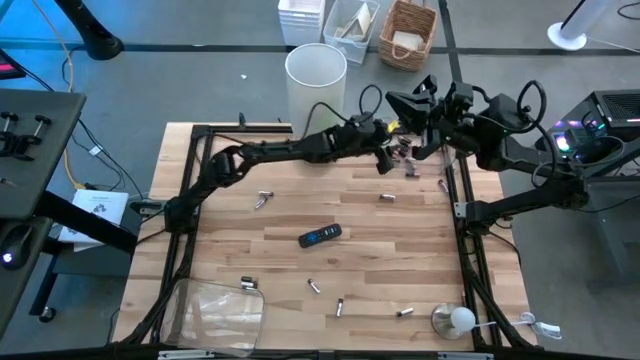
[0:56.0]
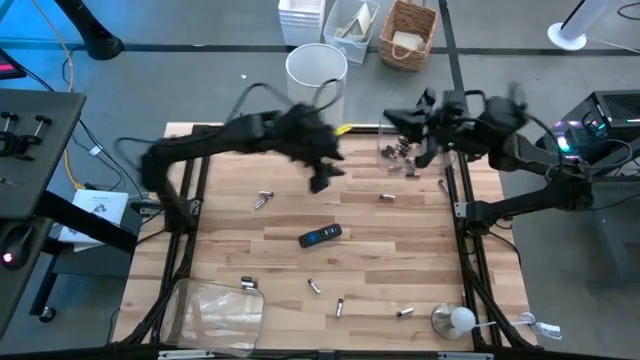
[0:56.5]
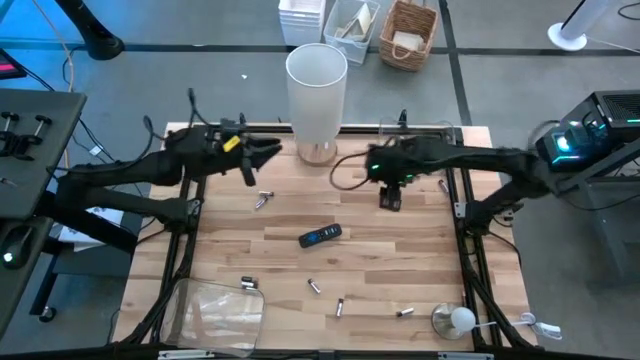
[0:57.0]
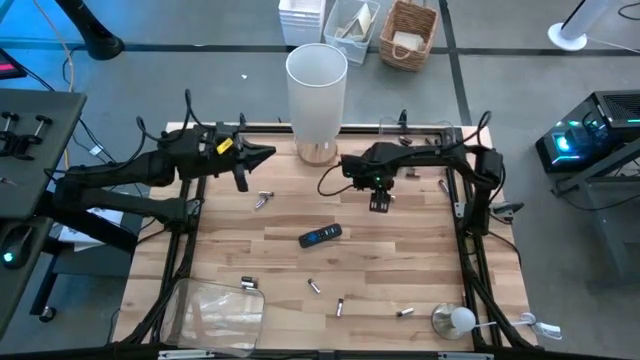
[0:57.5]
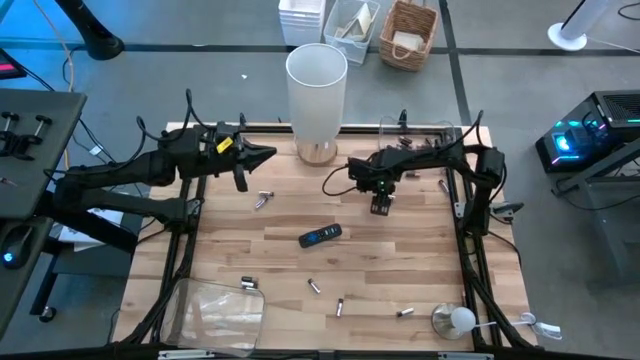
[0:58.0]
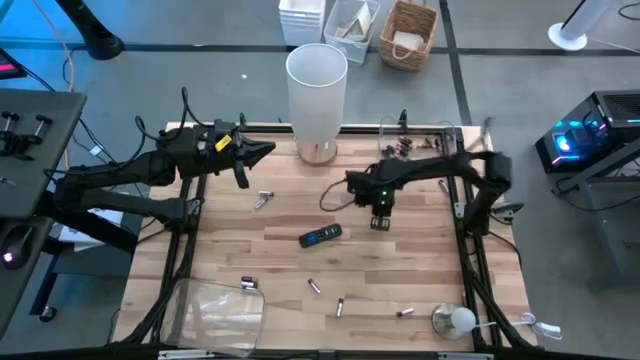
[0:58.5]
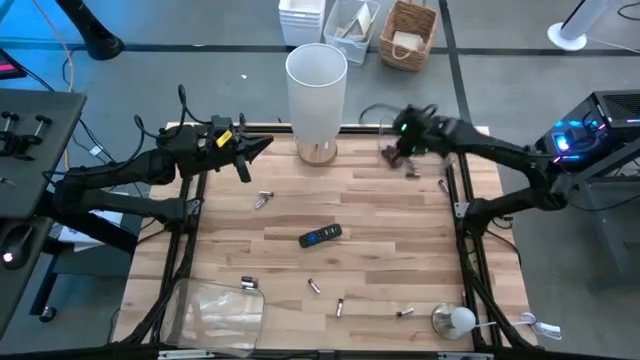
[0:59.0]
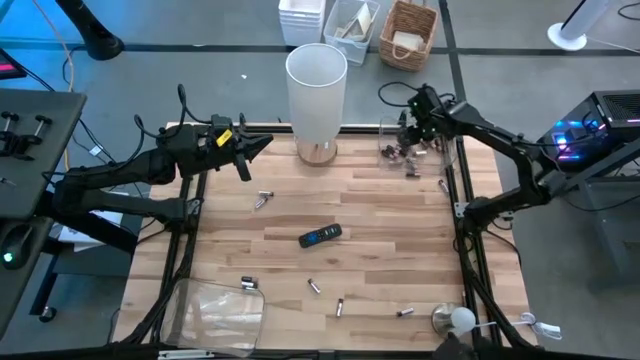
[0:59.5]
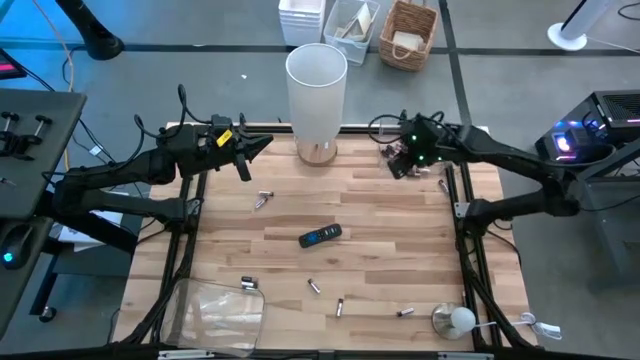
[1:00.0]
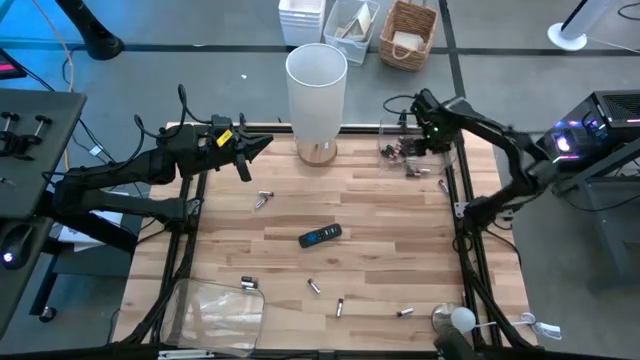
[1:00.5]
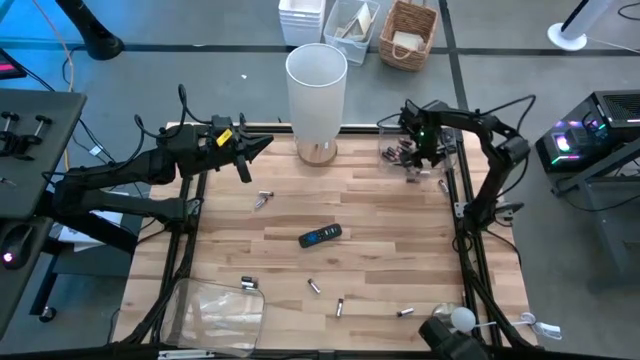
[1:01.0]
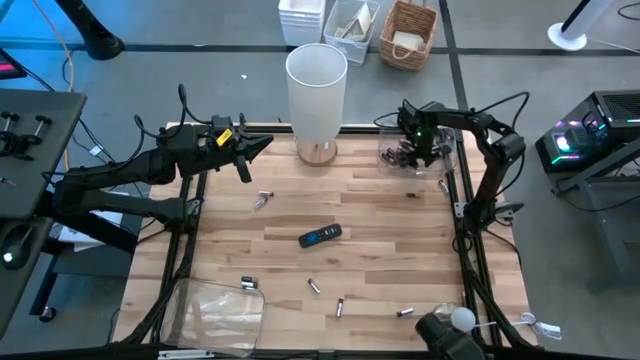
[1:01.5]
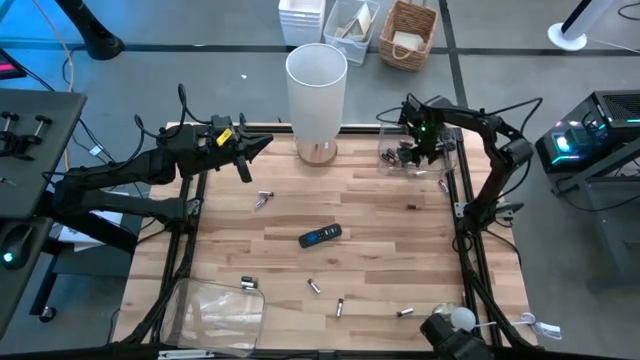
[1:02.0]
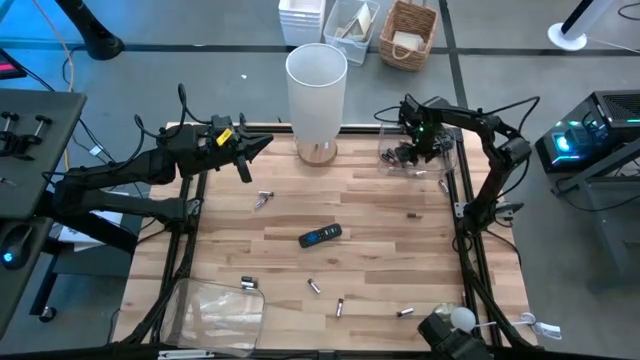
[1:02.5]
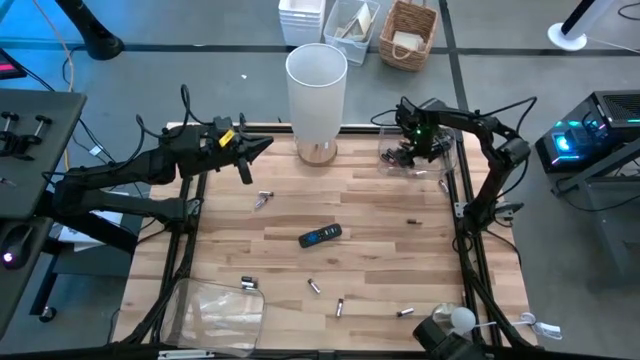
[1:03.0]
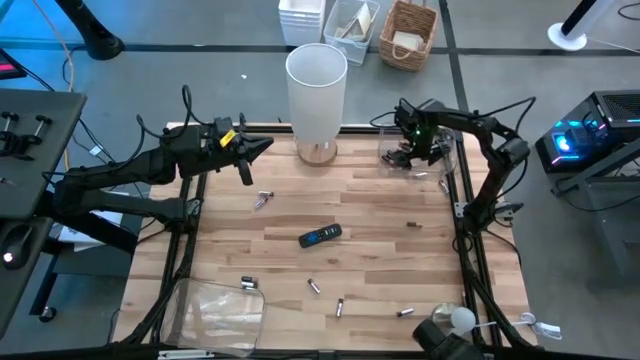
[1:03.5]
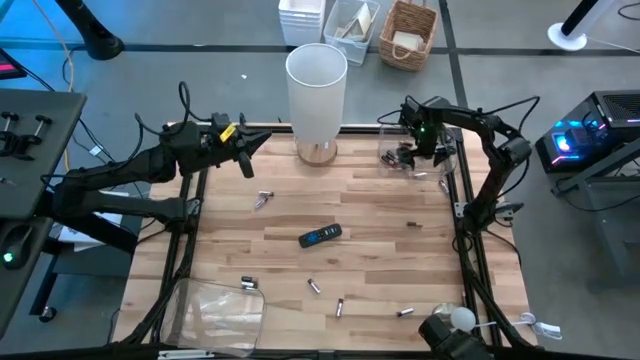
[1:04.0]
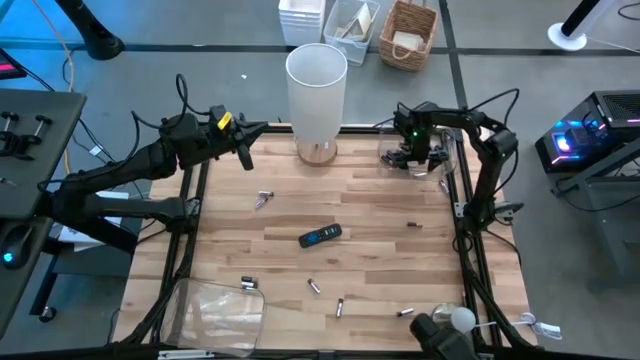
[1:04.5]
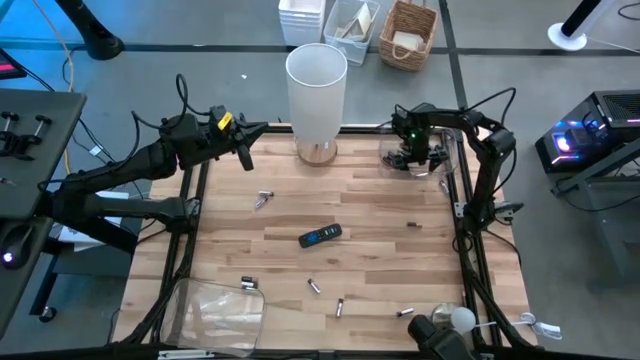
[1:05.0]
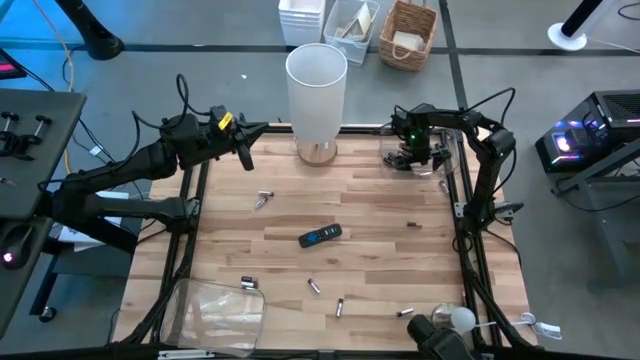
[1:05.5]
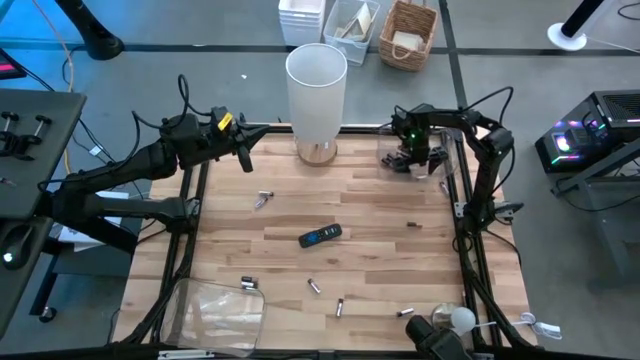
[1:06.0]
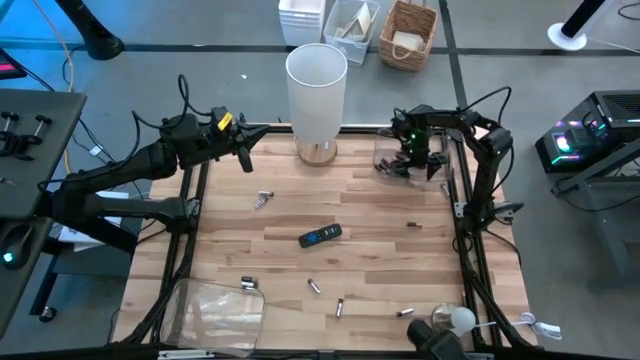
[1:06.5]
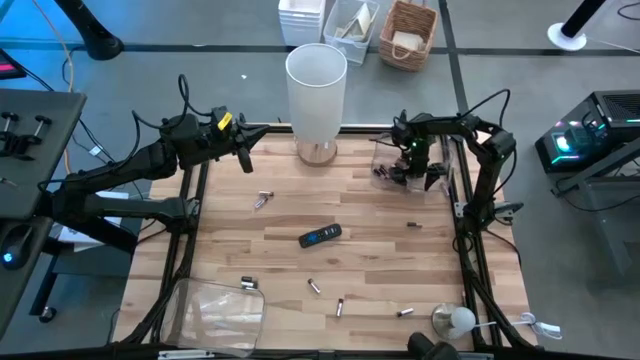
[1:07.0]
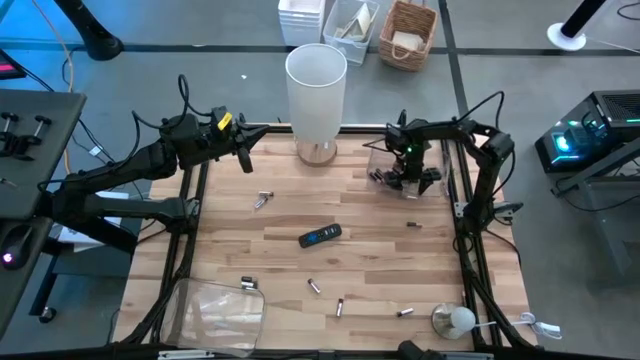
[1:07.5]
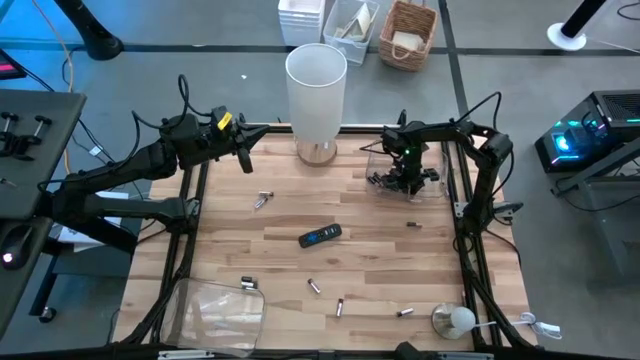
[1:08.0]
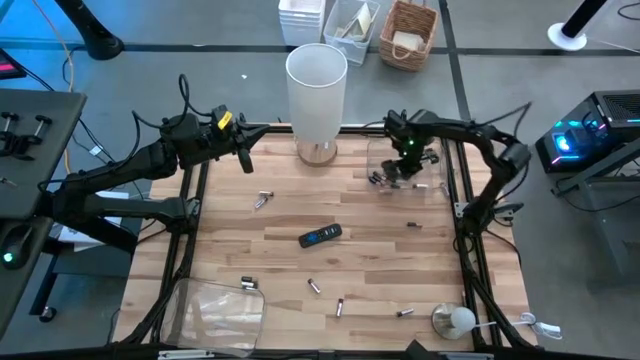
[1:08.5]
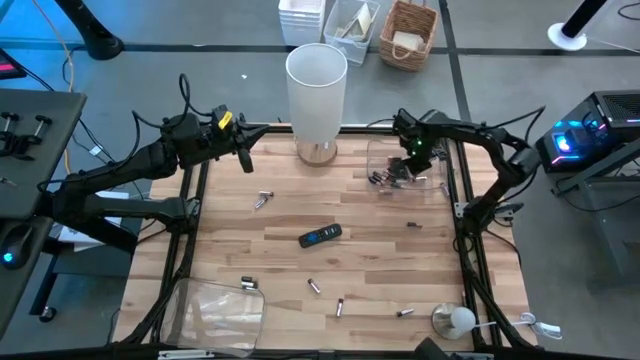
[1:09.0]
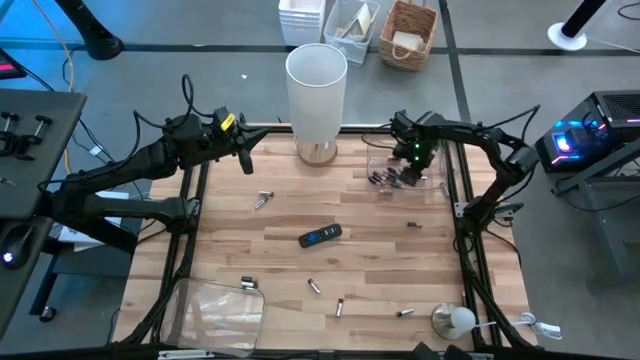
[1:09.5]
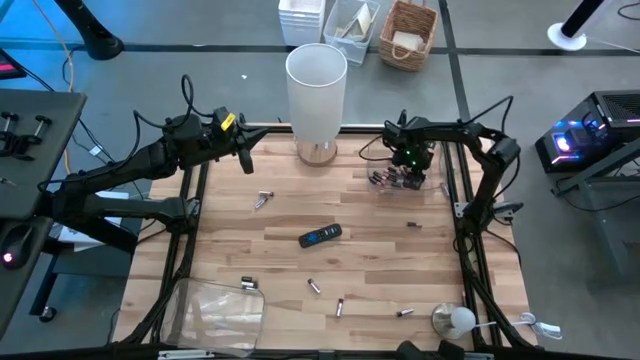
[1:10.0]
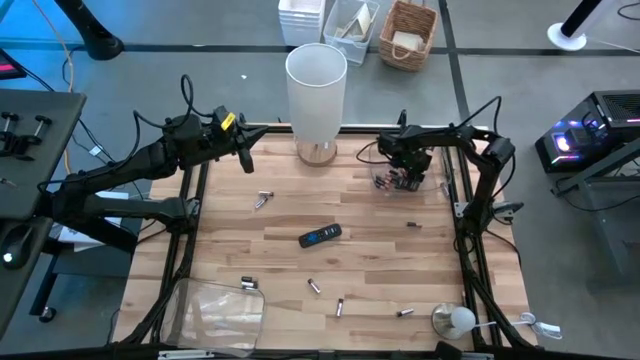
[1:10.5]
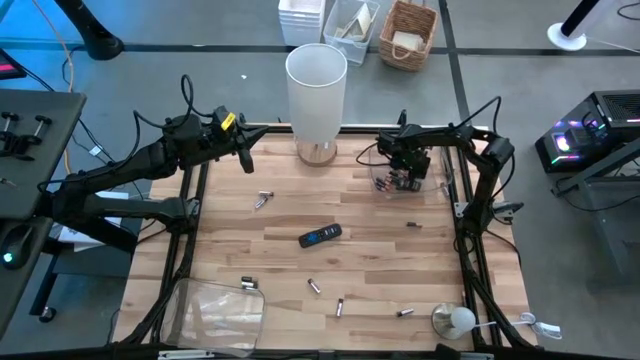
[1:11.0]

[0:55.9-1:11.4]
Task: Sort batteries
Put the silver battery into the bottom transparent bin

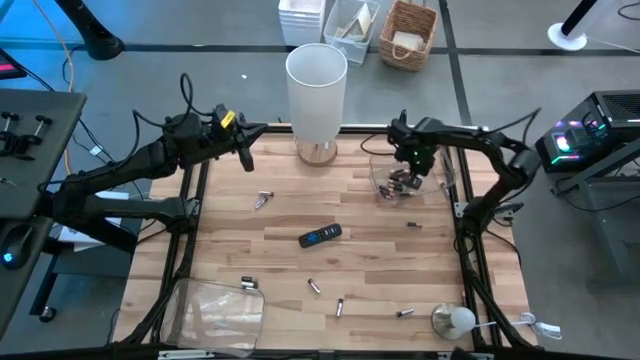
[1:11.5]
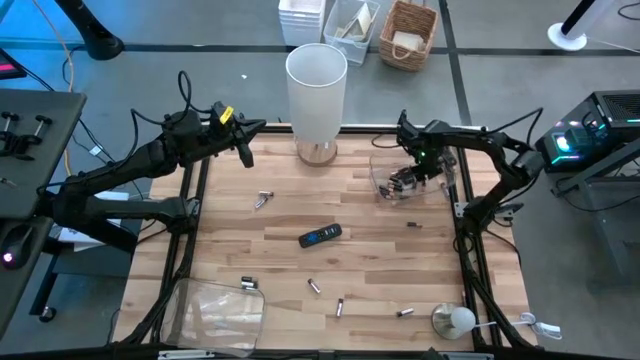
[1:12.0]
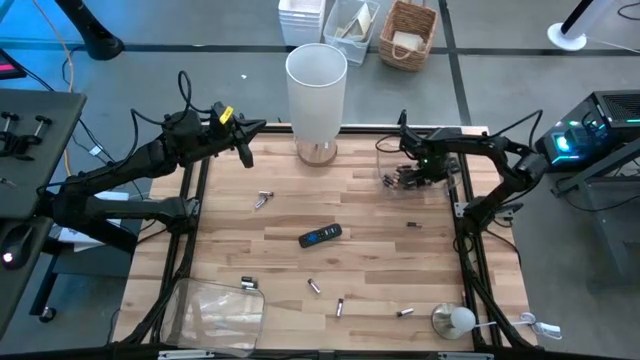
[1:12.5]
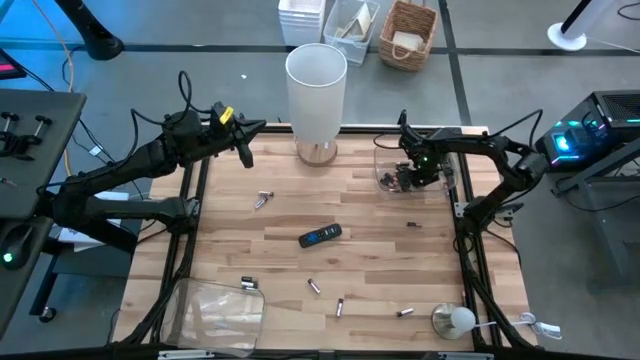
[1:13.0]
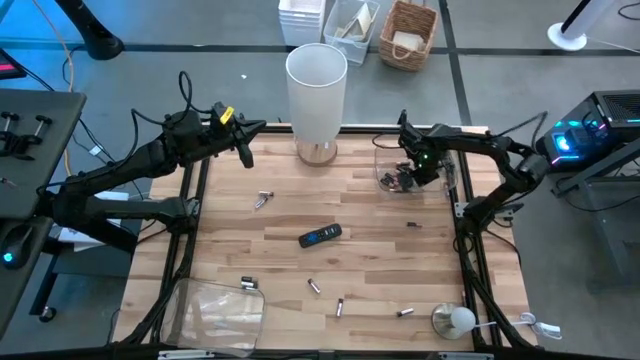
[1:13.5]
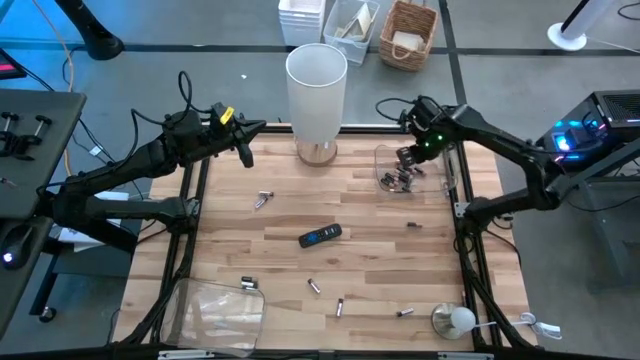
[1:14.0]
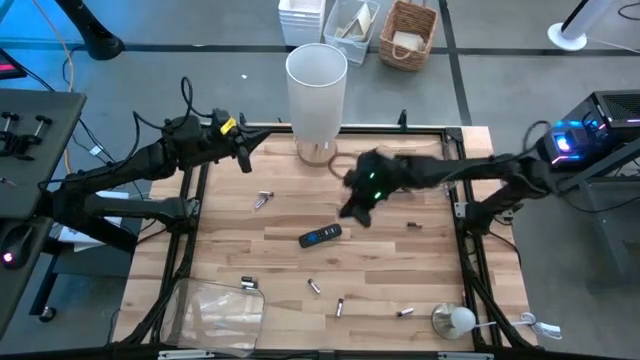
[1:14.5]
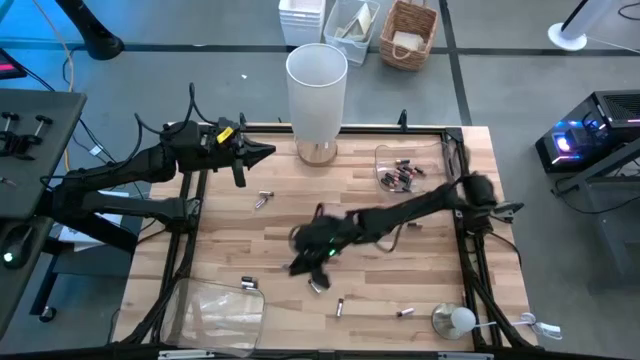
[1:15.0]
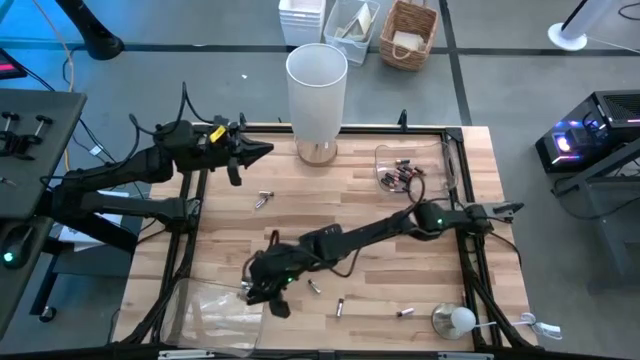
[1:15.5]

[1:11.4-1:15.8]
Put the silver battery into the bottom transparent bin

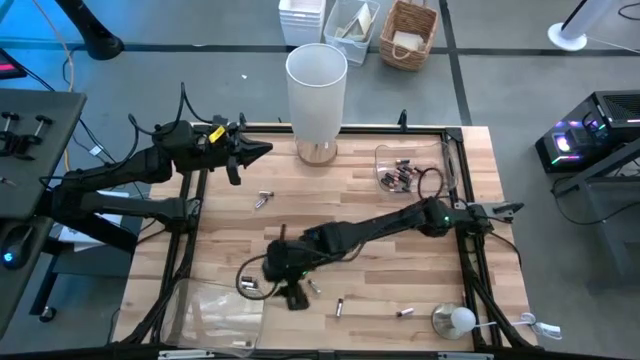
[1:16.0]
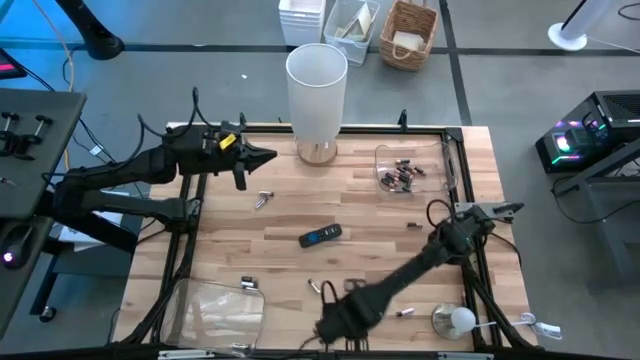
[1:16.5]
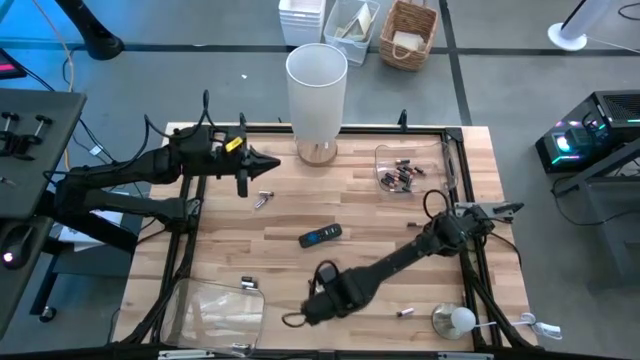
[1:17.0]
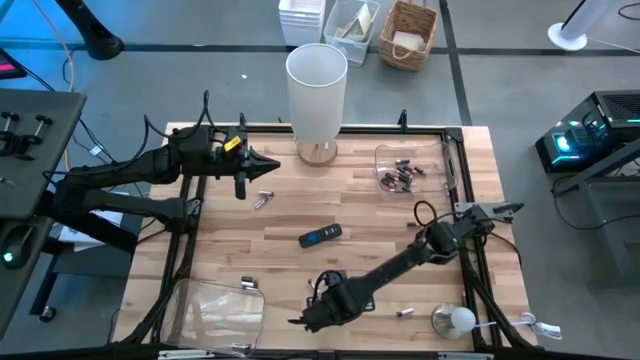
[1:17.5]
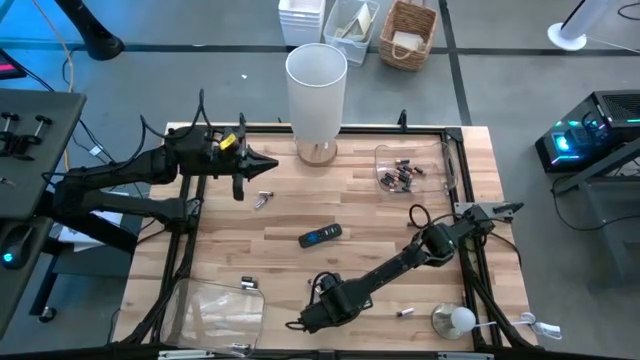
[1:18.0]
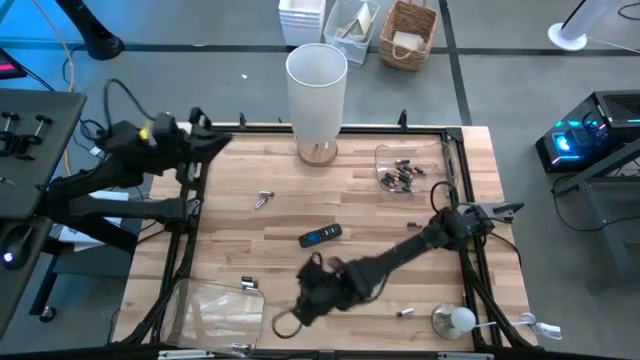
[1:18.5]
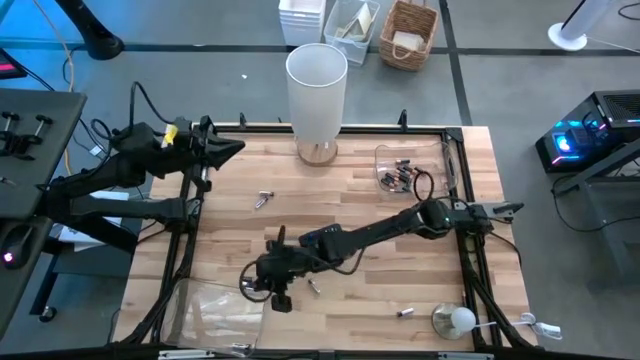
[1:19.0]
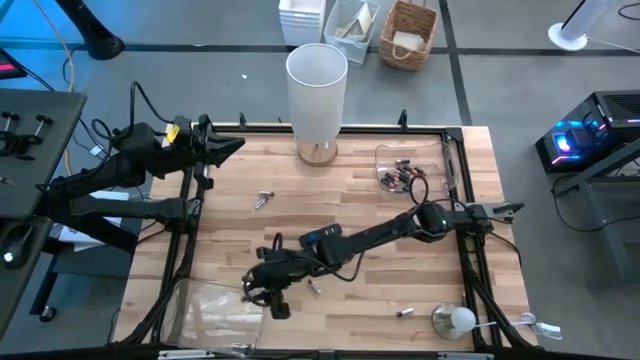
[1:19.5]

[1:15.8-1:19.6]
Put the silver battery into the bottom transparent bin
